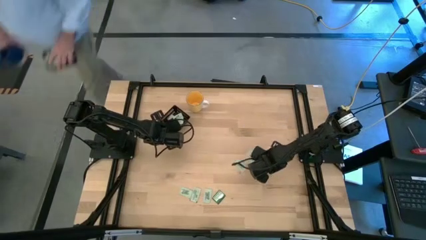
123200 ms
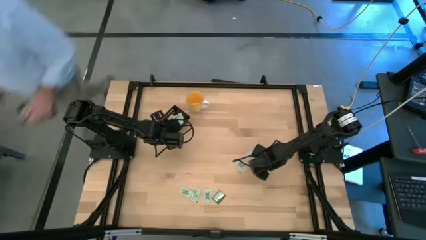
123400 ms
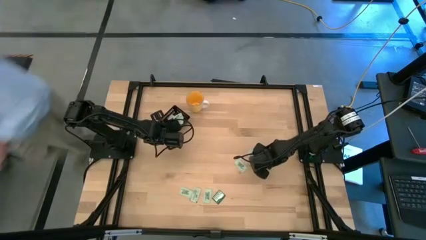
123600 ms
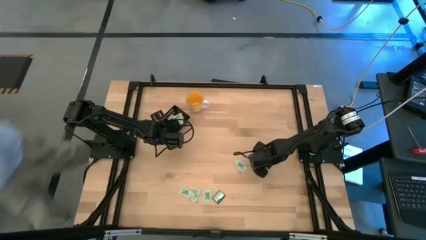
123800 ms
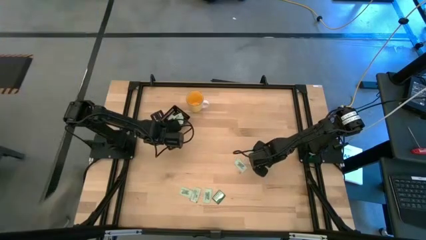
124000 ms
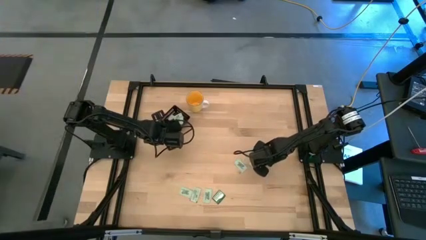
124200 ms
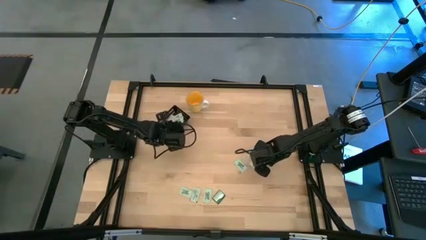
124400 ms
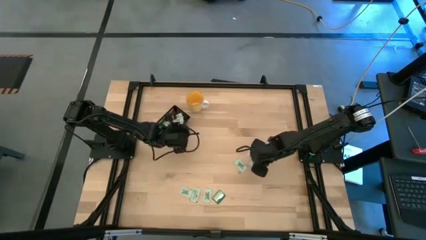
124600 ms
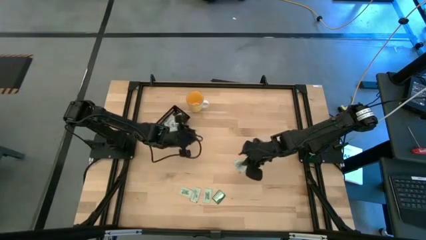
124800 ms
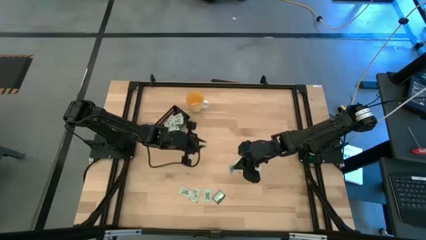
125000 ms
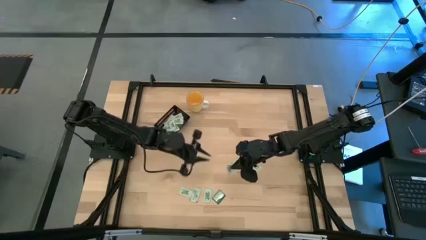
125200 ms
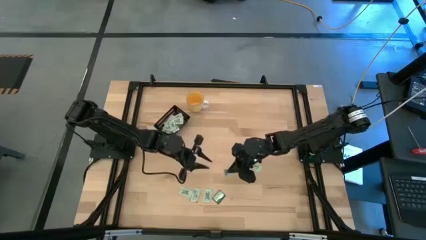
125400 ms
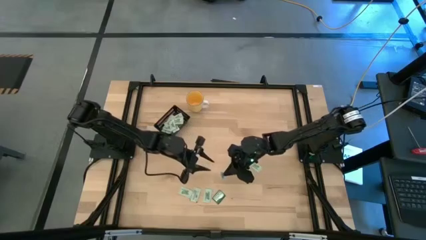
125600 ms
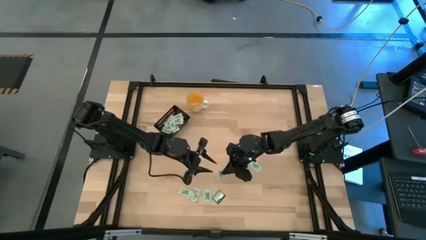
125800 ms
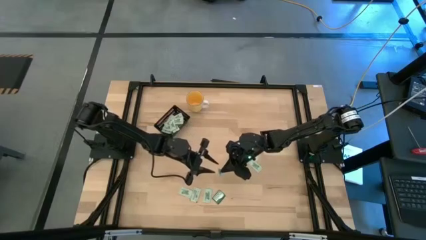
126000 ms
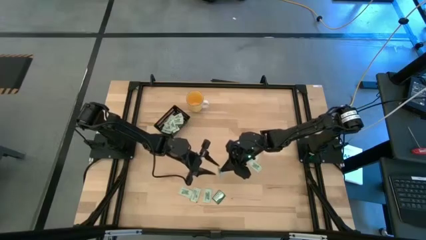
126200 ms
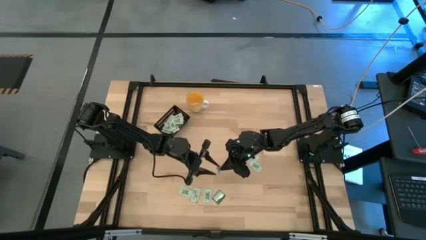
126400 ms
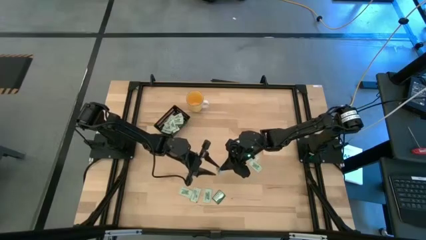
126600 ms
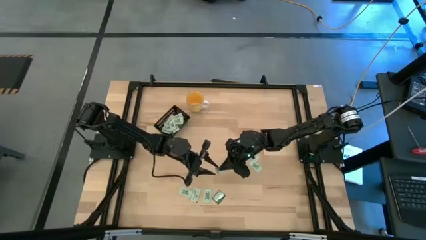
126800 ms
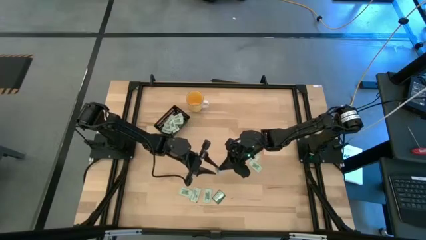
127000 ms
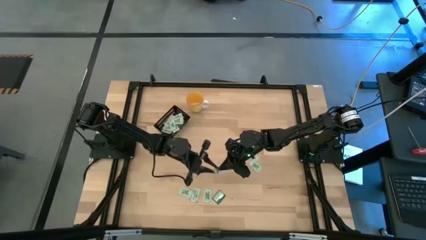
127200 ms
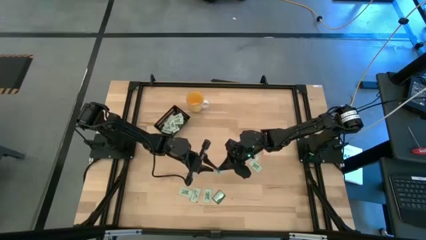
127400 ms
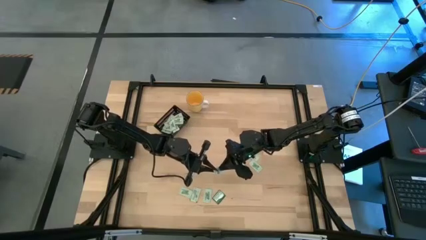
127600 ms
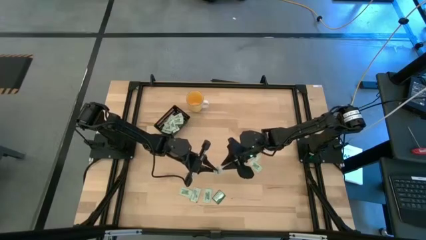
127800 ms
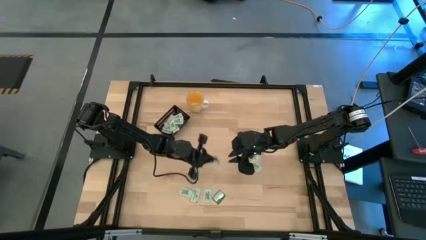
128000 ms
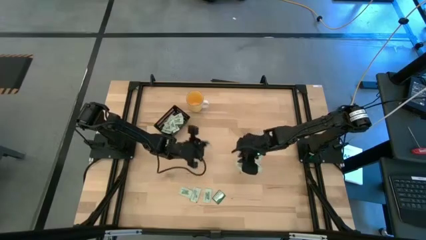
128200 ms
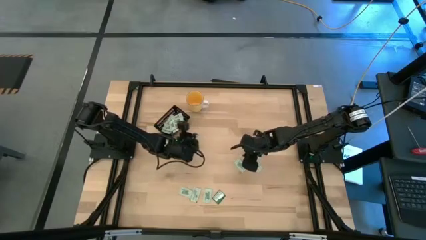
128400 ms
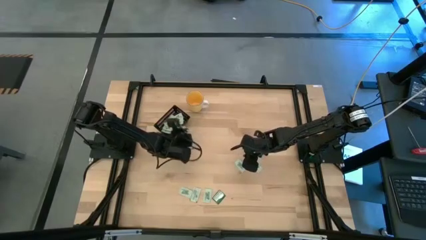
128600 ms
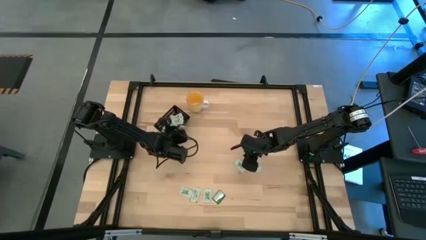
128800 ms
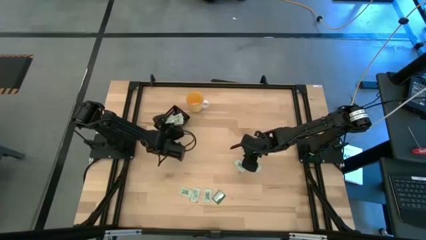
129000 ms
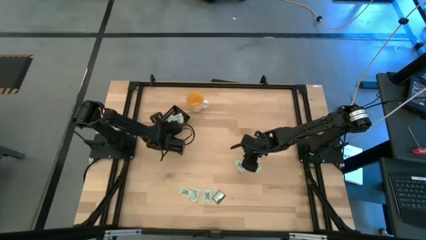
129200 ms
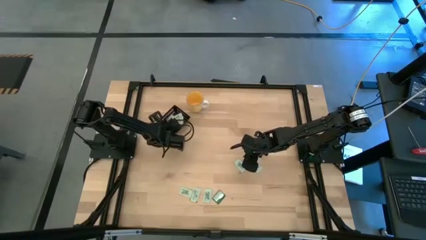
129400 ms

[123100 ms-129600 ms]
Task: Pick and place Stevia / Truvia into bins
Put the green stevia packet into the black bin

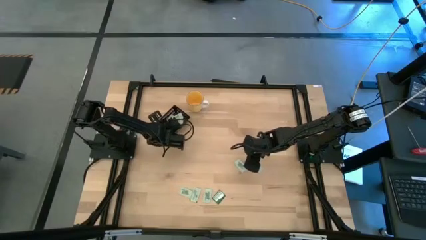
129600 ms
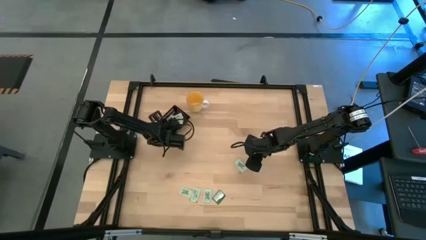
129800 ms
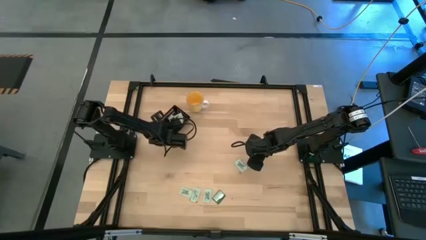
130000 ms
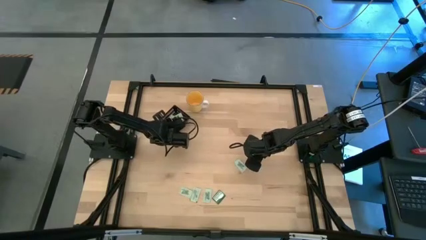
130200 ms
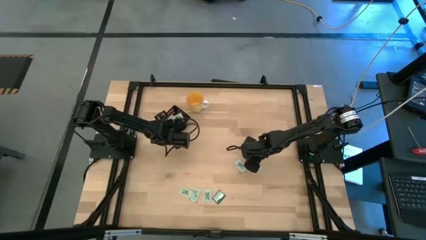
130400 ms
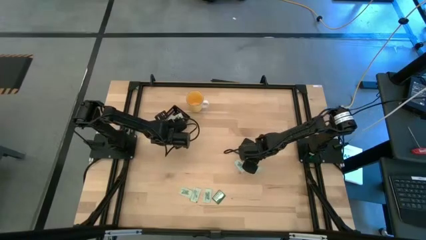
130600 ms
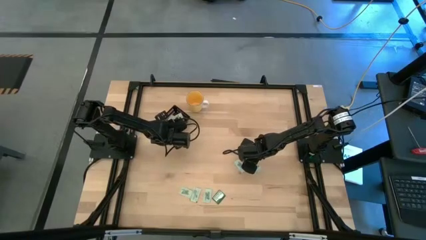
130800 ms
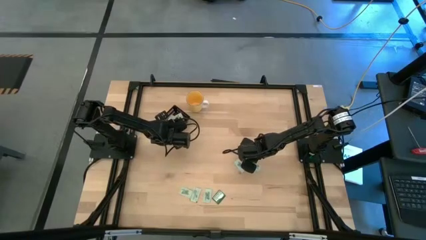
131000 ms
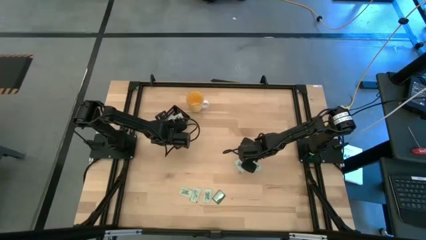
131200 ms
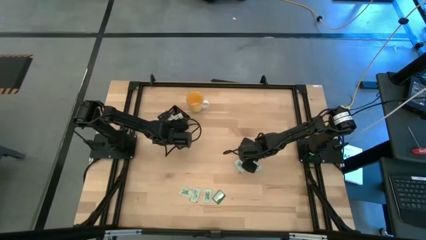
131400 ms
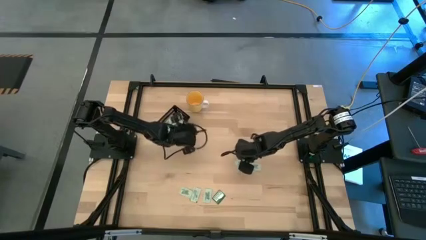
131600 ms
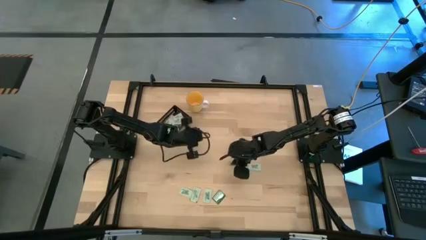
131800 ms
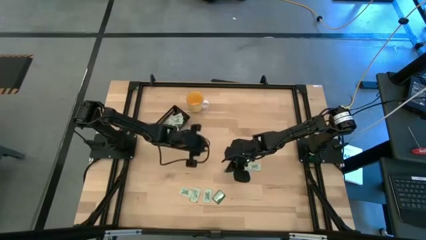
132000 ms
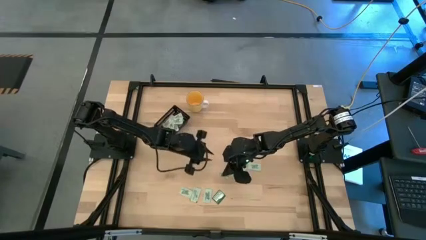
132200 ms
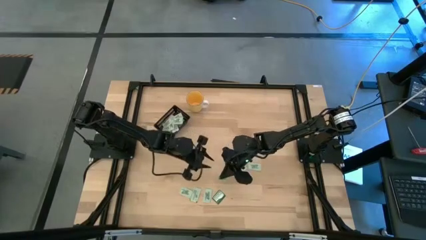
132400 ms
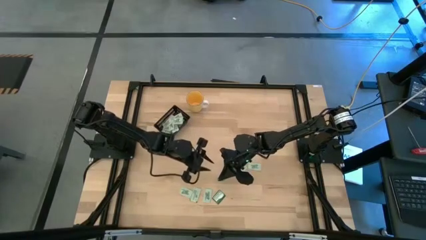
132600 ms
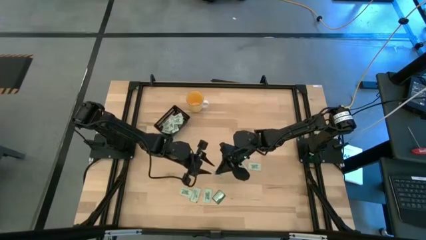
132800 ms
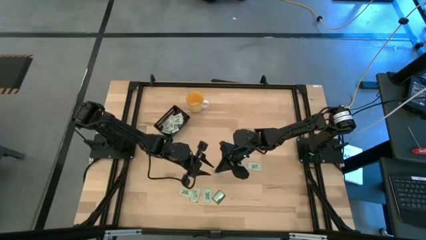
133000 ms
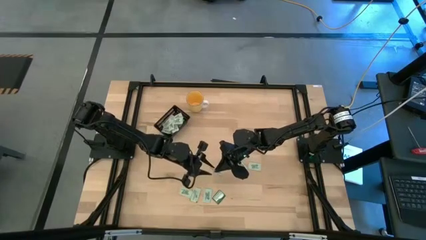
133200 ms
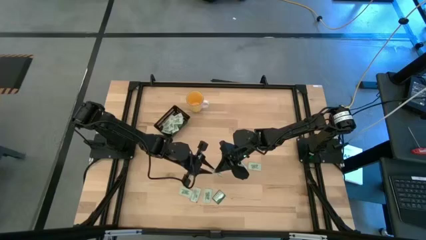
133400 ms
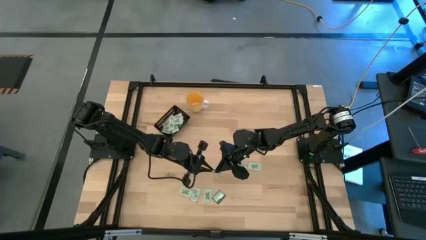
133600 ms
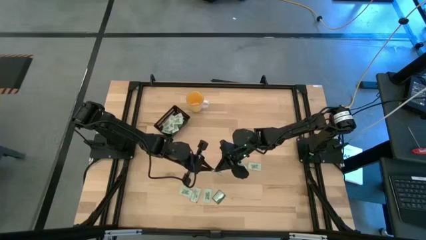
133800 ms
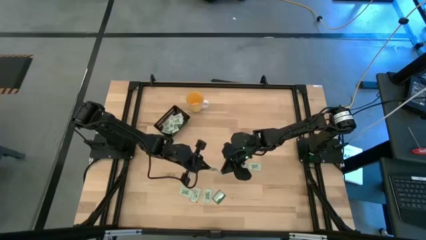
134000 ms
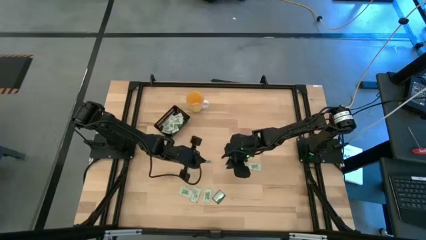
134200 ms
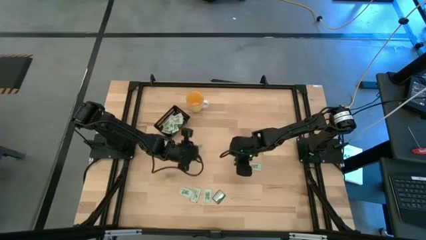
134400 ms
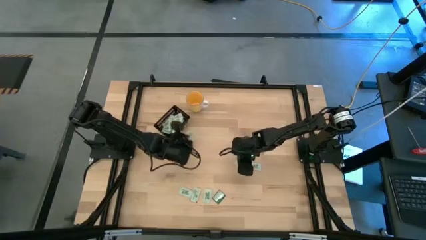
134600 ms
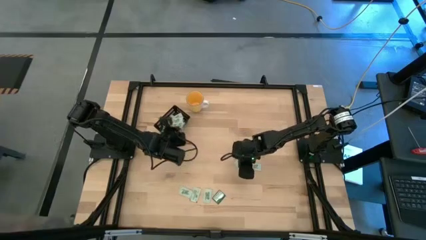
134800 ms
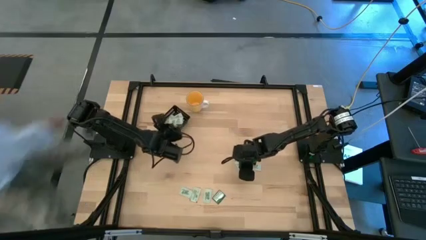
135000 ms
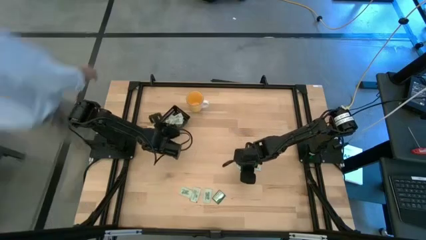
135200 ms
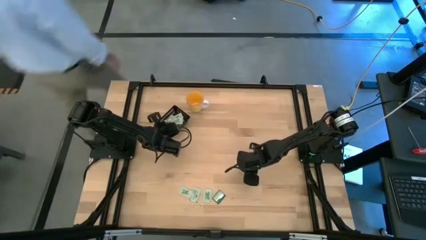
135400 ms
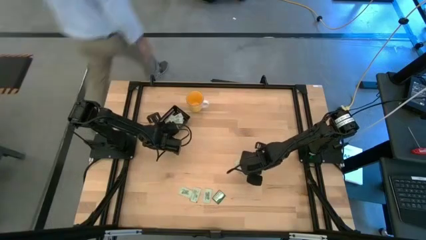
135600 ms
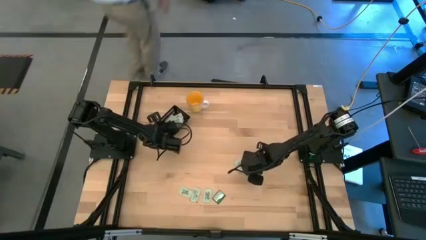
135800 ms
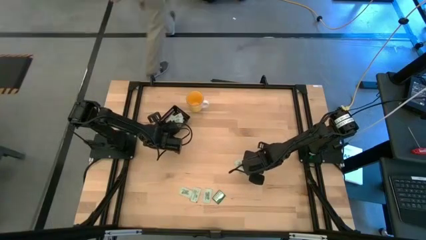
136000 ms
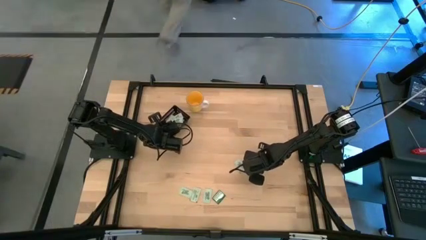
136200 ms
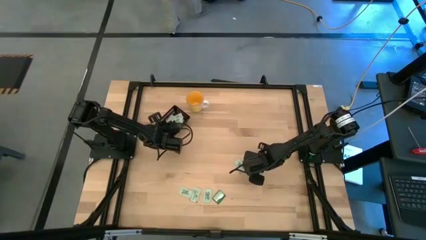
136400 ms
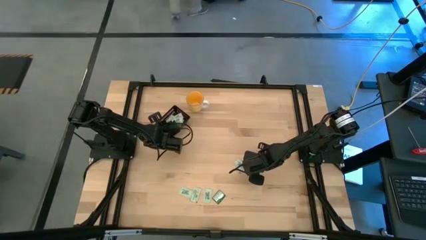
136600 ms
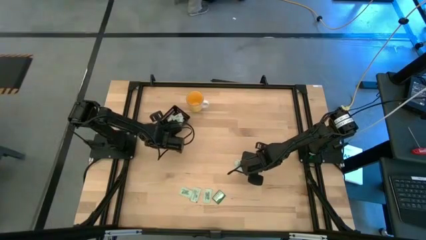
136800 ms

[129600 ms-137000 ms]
Put the green stevia packet into the black bin

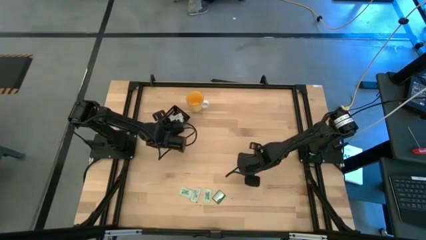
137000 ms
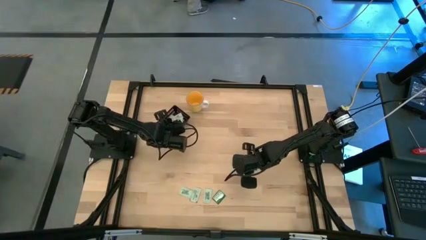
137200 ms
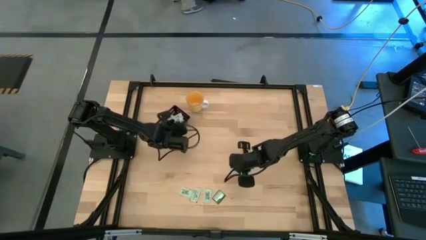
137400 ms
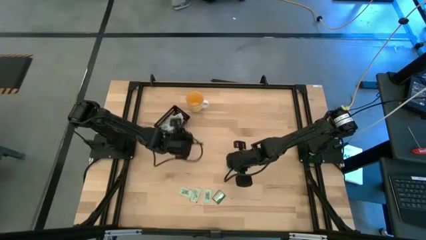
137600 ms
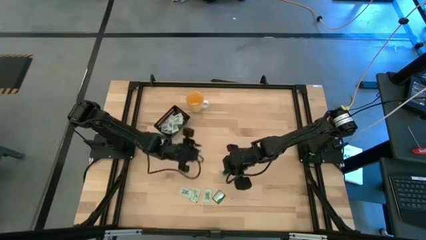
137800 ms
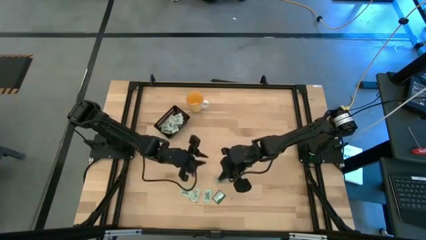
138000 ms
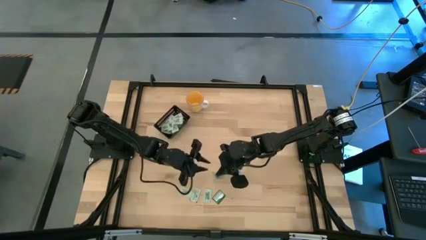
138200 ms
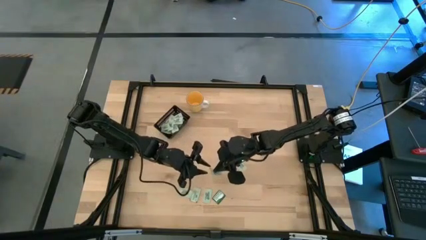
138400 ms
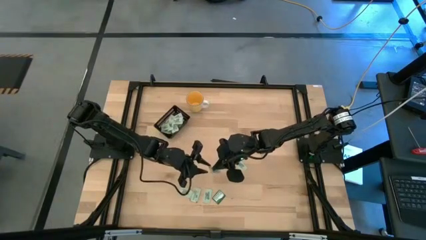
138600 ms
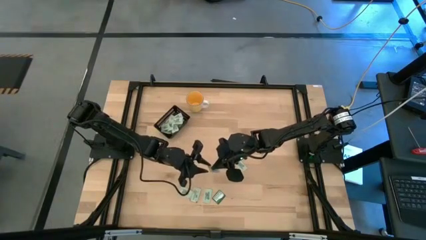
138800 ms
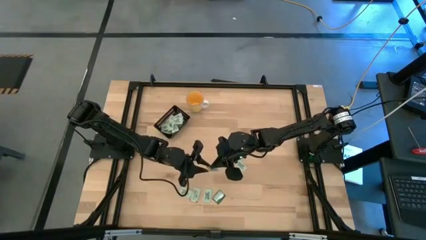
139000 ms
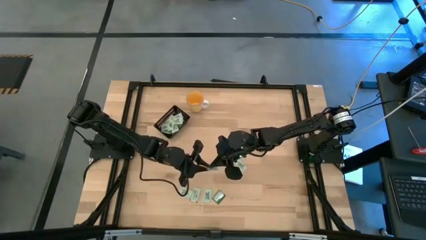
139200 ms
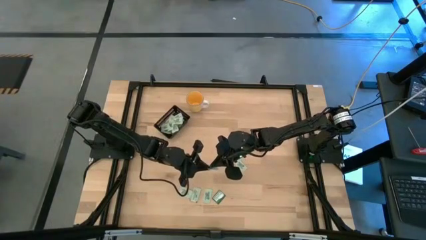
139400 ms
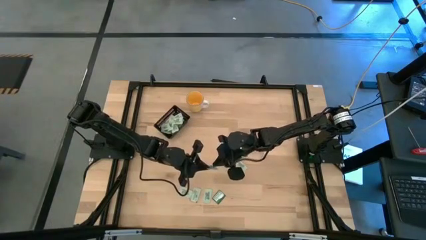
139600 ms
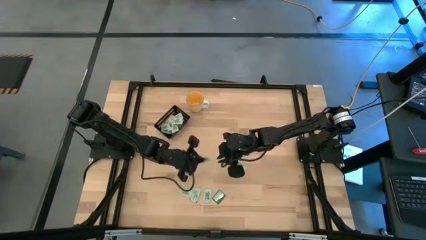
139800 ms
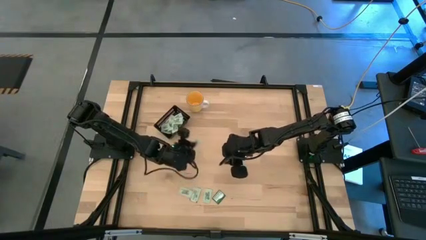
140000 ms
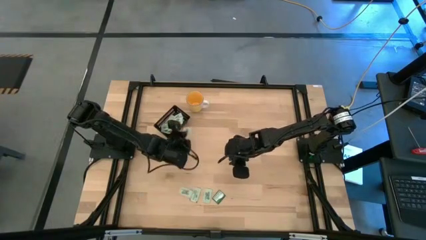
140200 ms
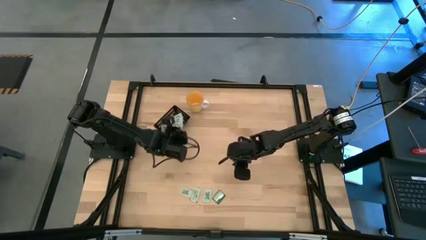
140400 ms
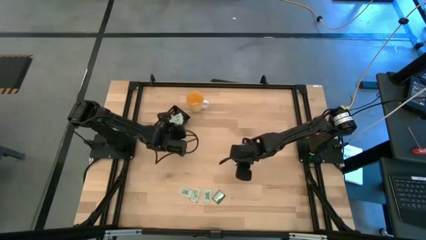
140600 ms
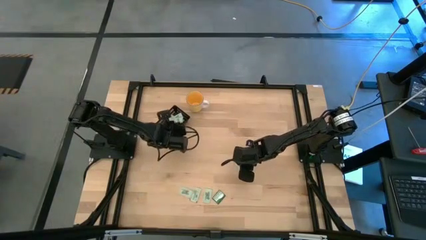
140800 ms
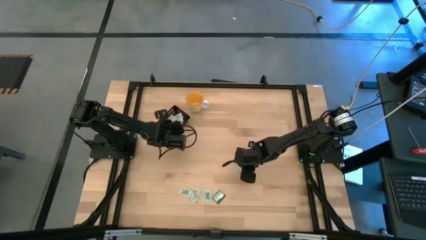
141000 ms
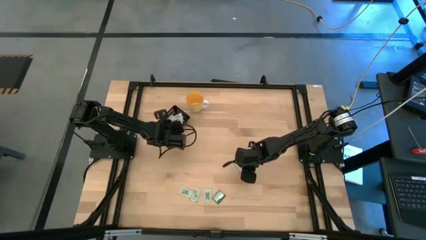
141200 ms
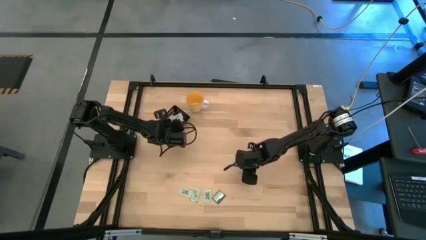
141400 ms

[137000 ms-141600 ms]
Put the green stevia packet into the black bin
